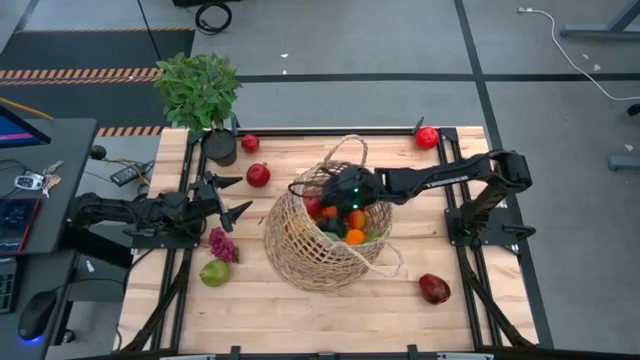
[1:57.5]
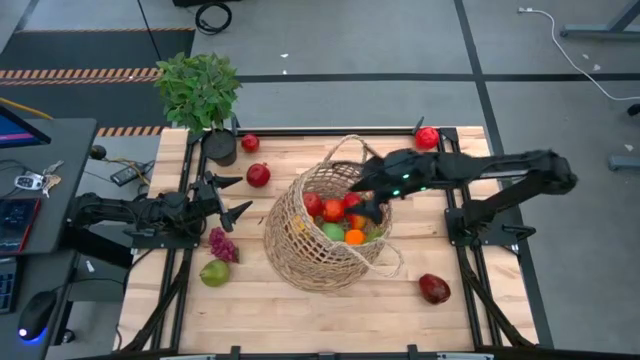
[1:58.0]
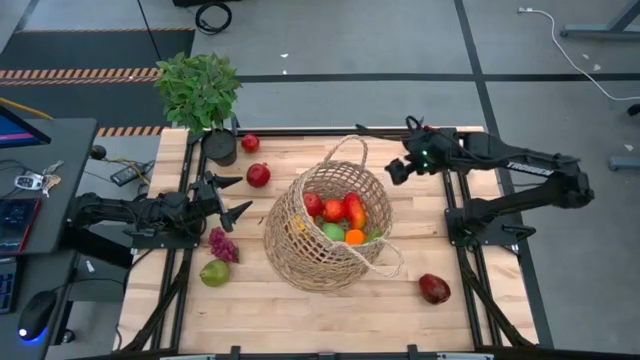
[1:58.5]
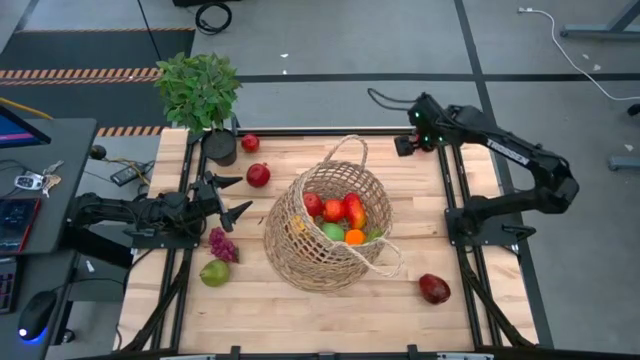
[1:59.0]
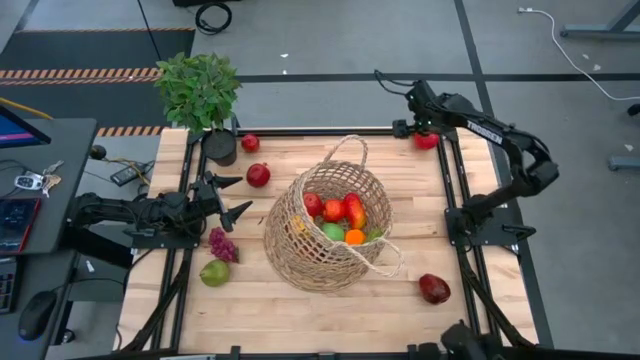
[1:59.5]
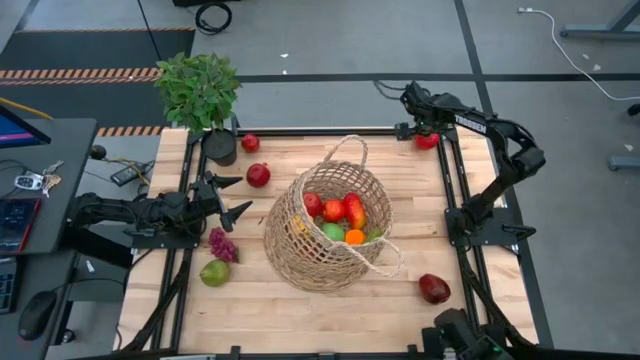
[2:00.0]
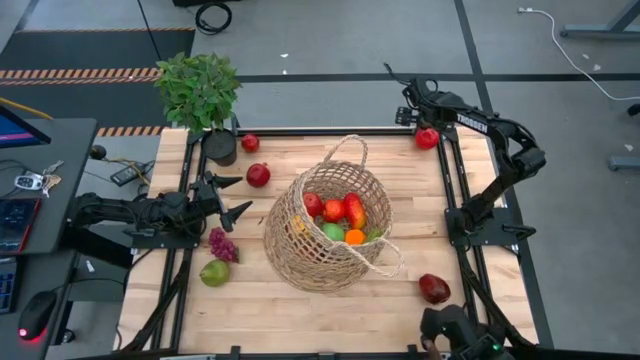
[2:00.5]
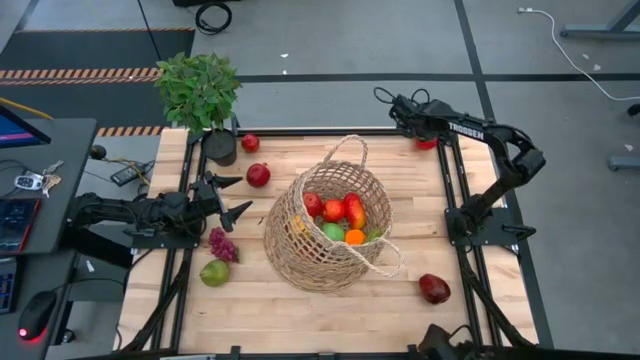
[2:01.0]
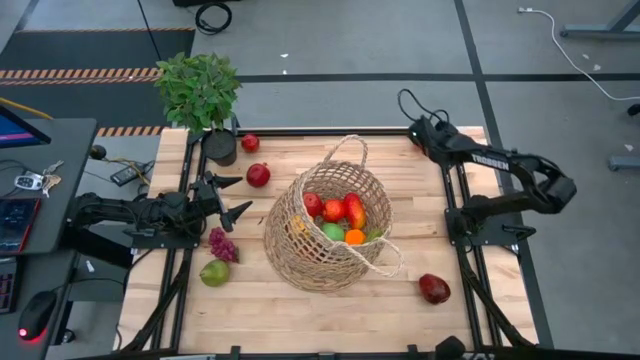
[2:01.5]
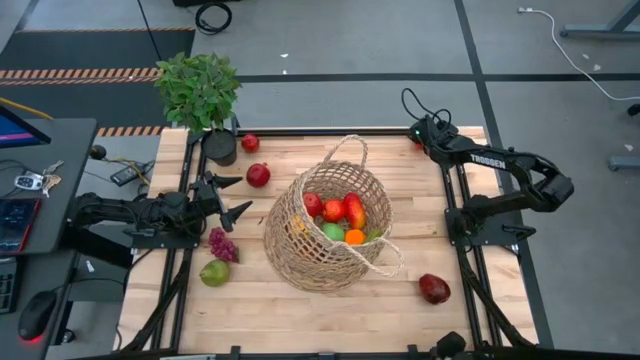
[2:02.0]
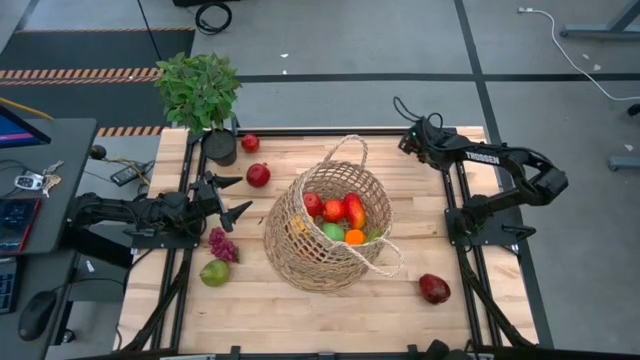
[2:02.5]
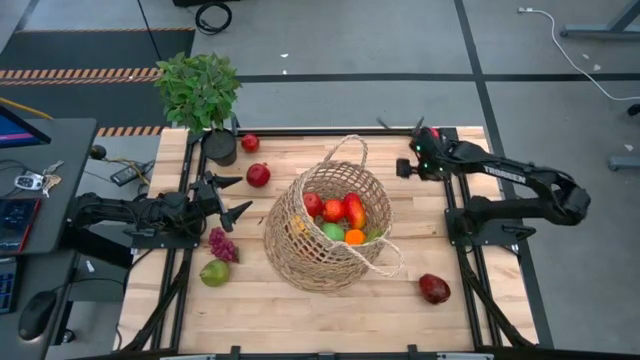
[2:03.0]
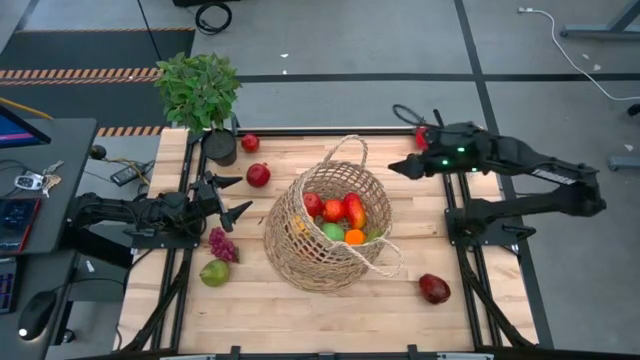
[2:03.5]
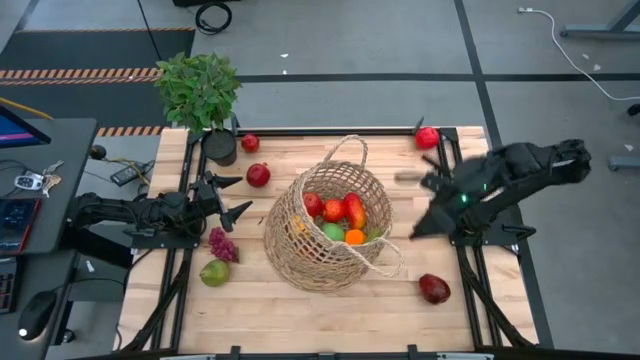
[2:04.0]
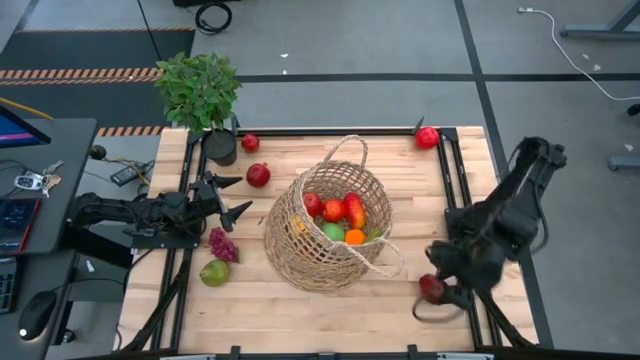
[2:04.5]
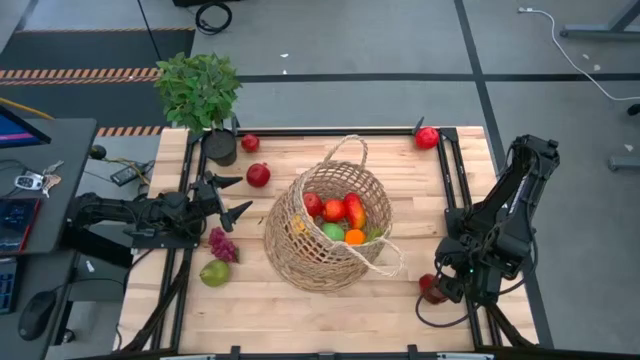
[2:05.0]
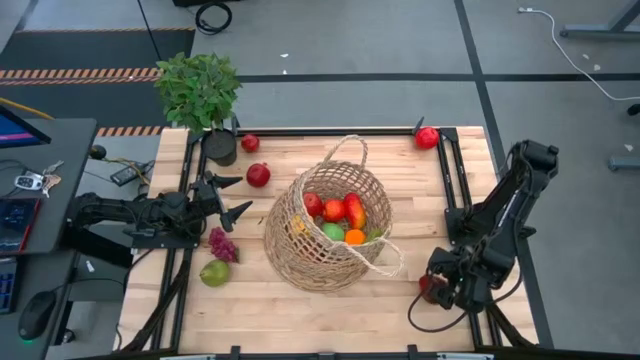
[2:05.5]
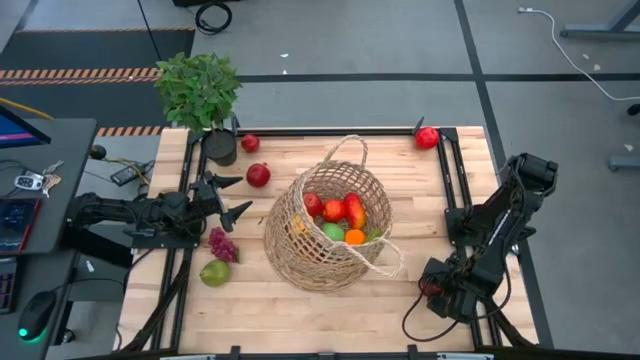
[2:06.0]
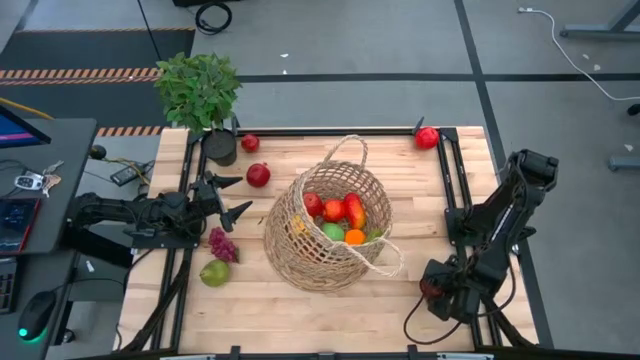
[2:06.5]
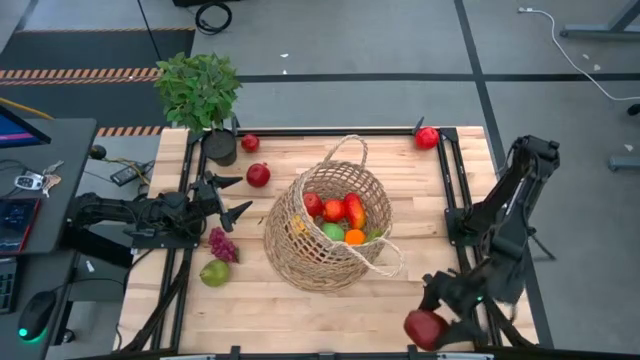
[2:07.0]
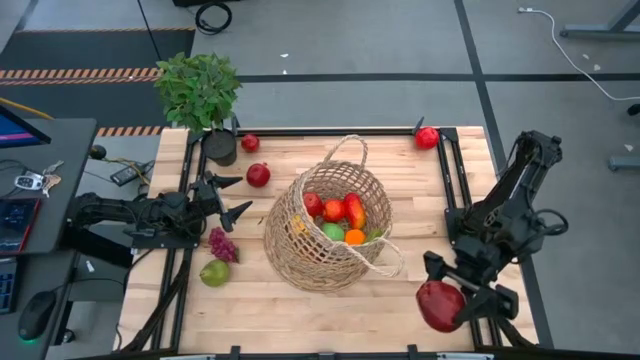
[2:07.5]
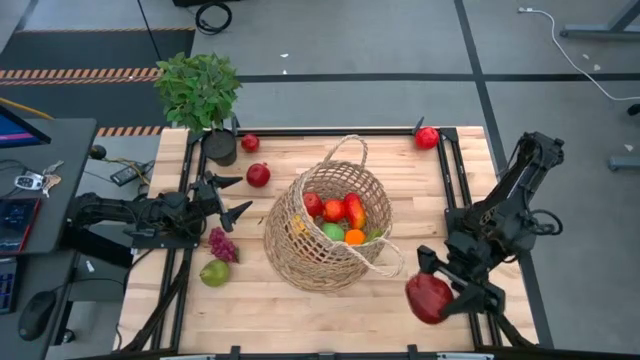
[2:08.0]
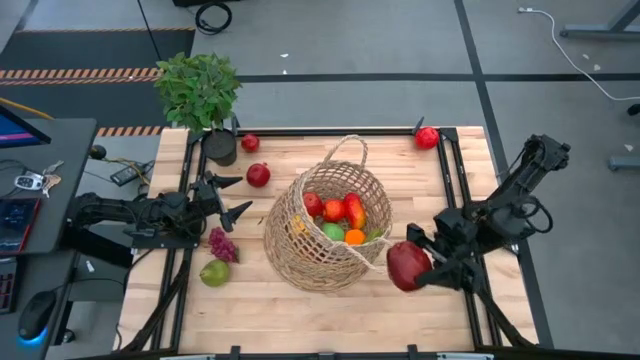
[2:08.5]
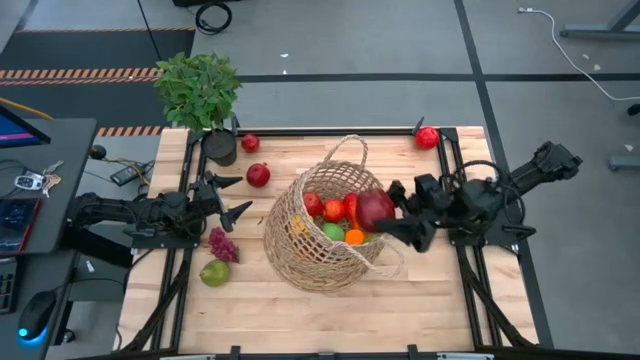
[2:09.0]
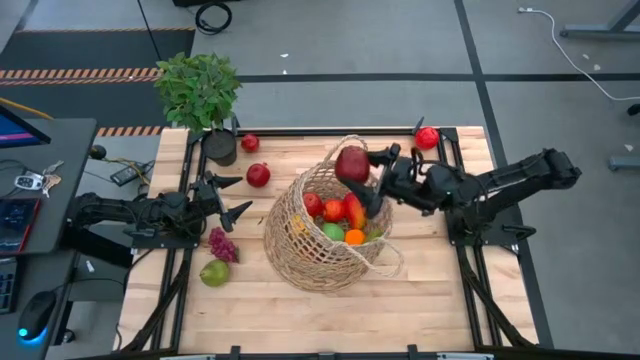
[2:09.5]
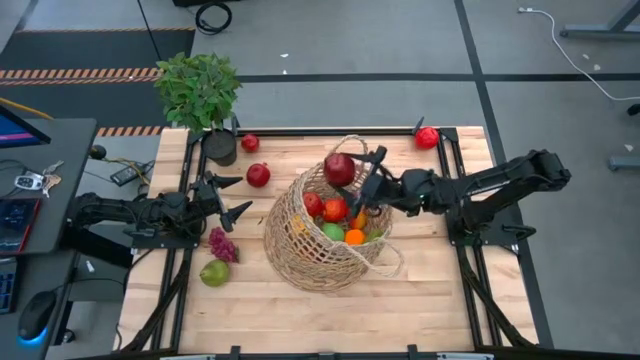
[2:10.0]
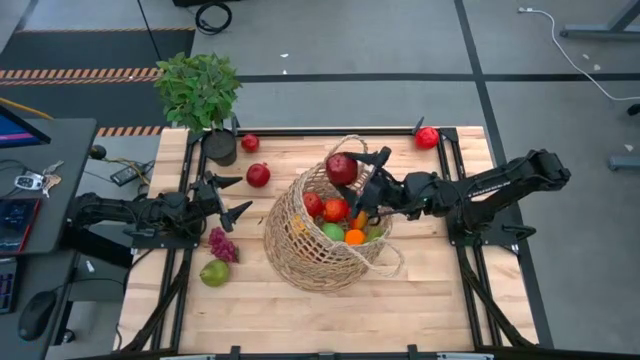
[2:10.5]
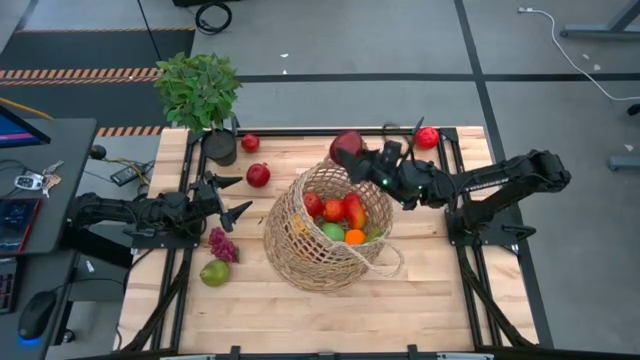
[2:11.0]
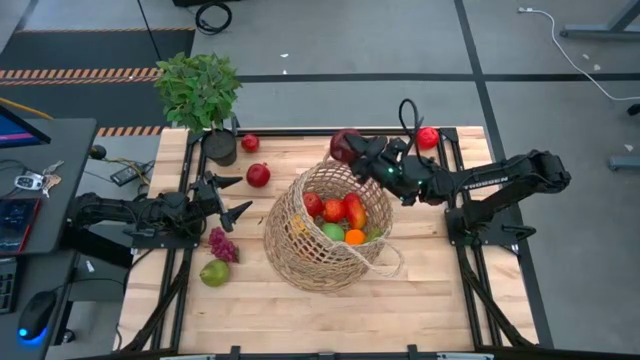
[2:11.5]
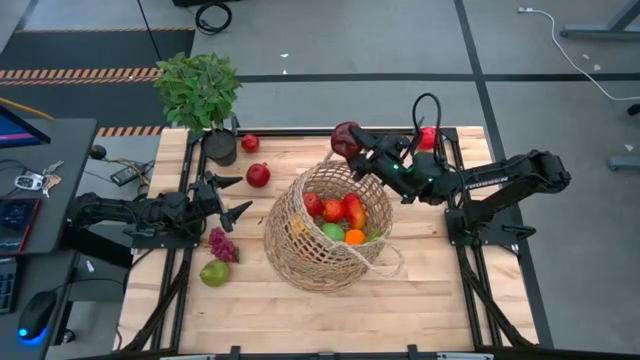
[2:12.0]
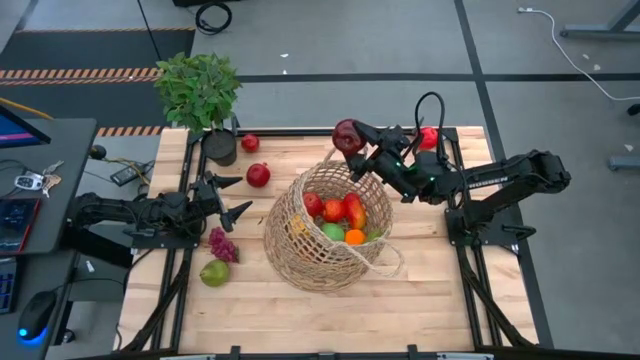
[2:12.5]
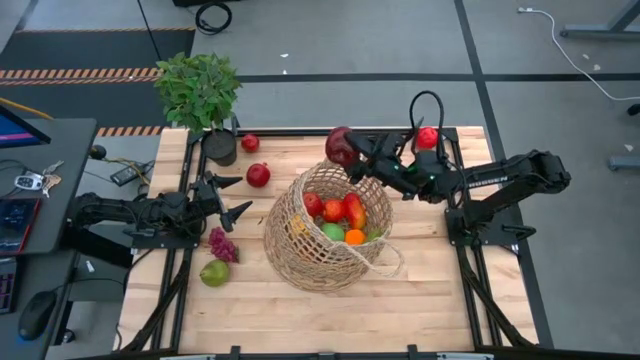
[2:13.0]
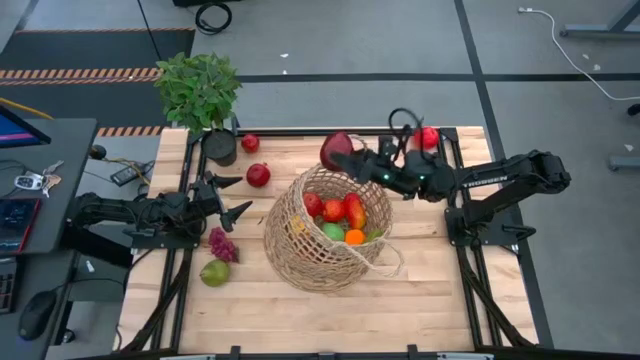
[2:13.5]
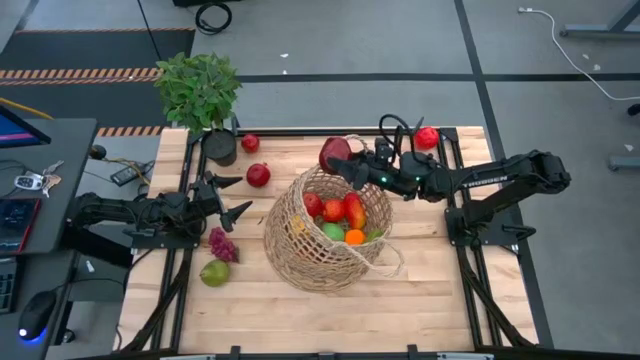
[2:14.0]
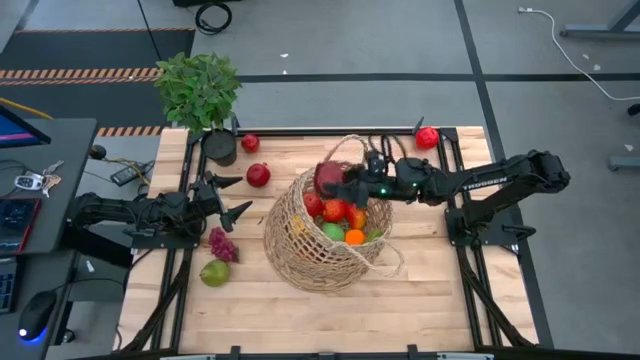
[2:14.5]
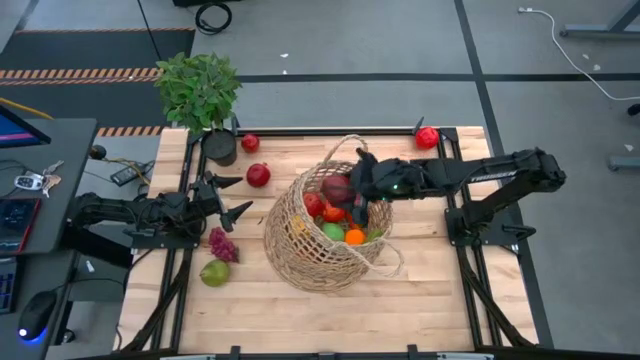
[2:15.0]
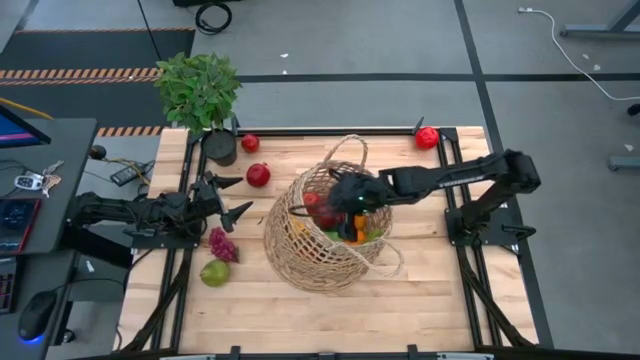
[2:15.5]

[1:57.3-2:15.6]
Task: Build produce basket
Put the dark red apple into the brown basket

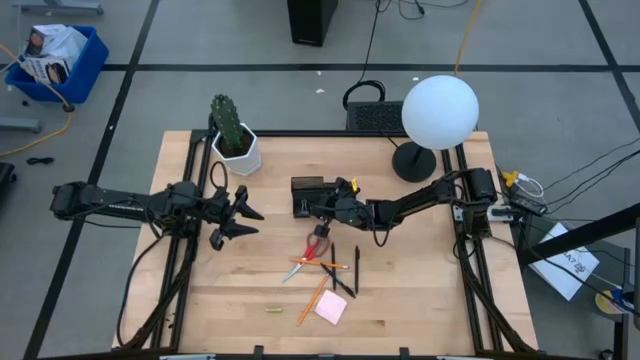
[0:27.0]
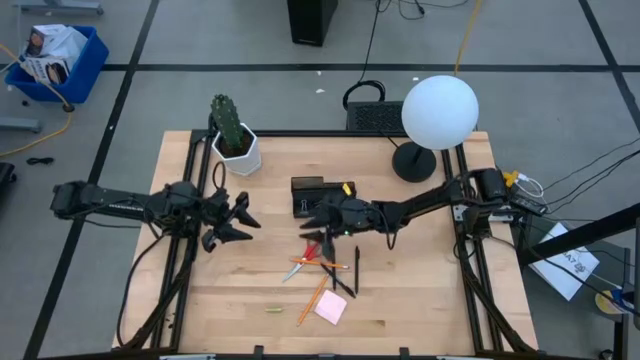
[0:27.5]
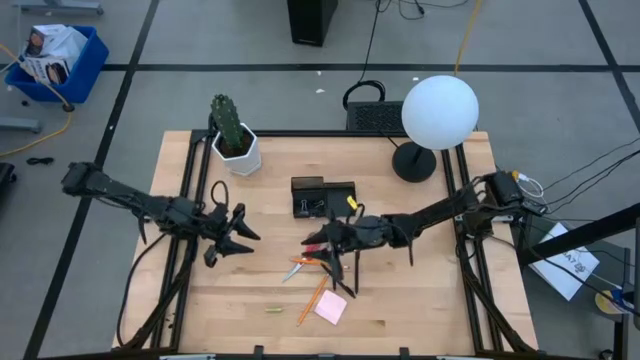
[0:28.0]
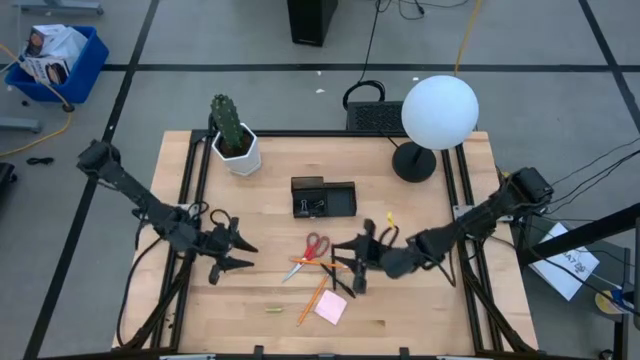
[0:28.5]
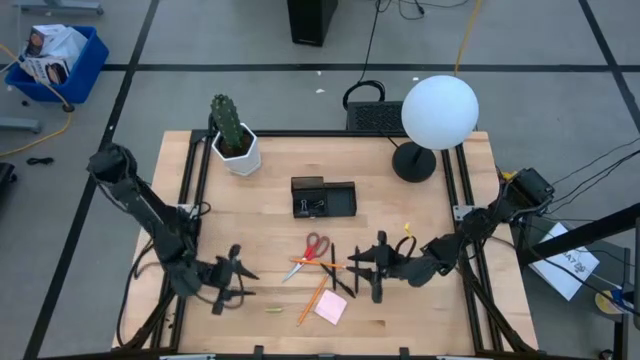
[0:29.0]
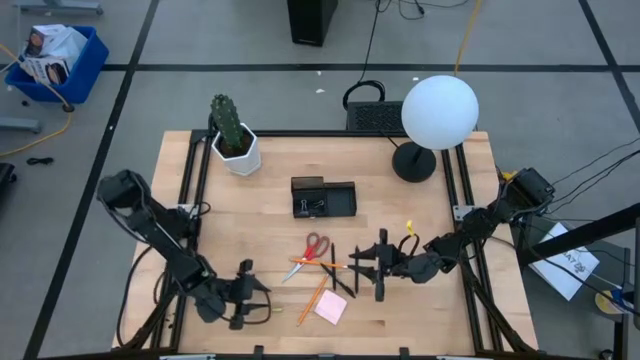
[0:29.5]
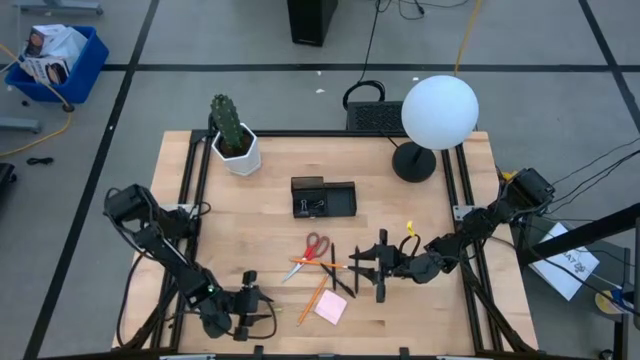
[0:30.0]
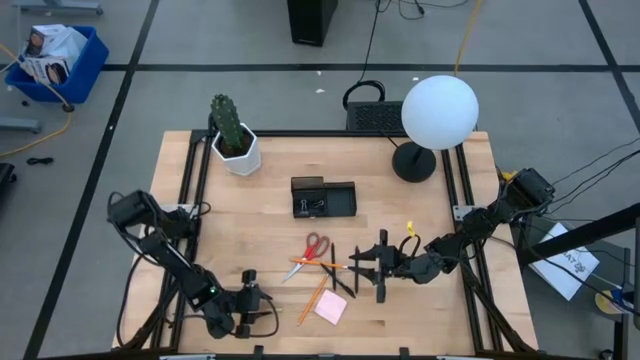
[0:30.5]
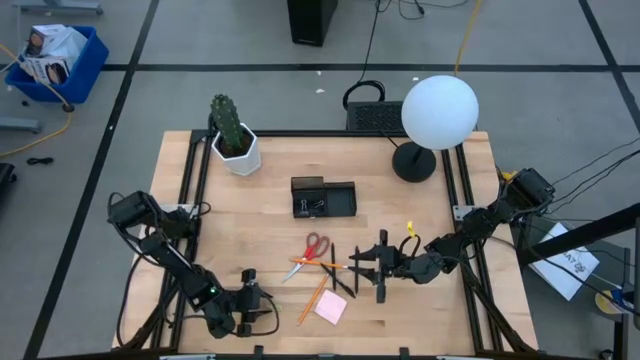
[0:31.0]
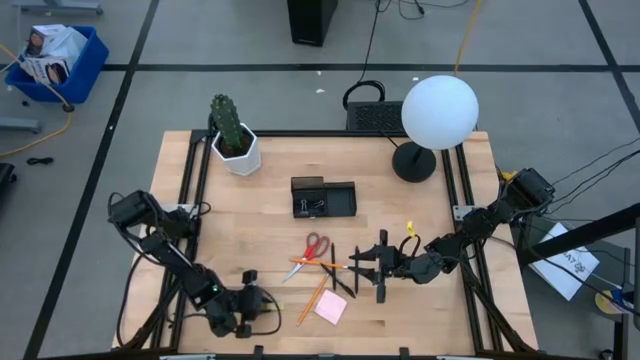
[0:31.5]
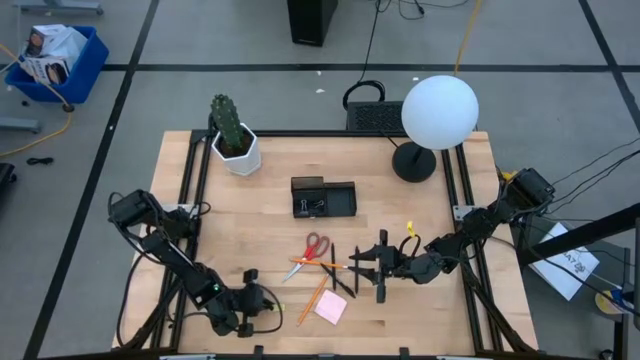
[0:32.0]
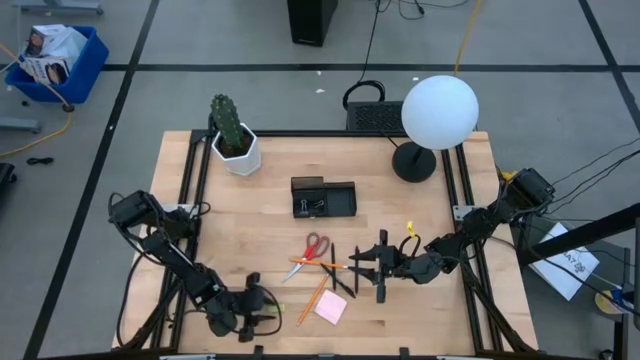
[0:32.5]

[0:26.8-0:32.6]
Task: Pick and place office supplies into organizer
Put the green eraser into the bottom left of the desk organizer
